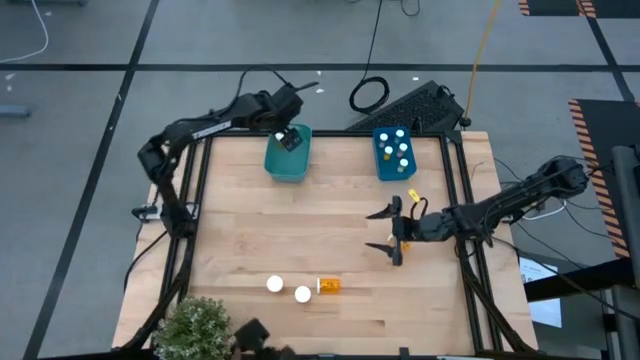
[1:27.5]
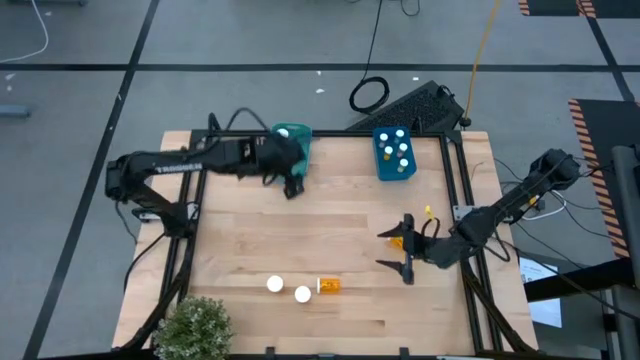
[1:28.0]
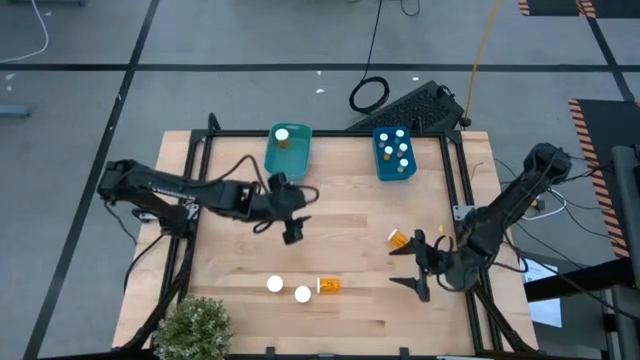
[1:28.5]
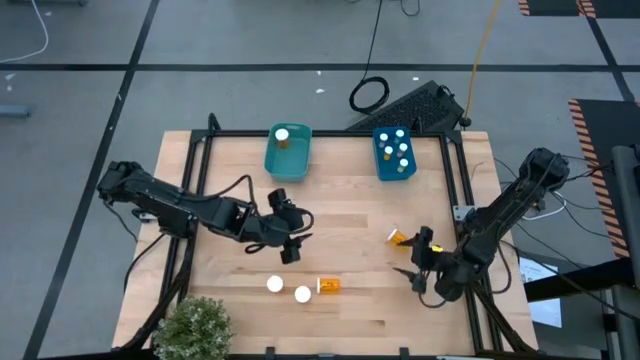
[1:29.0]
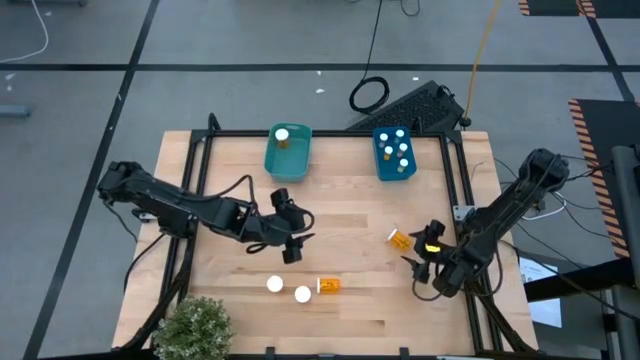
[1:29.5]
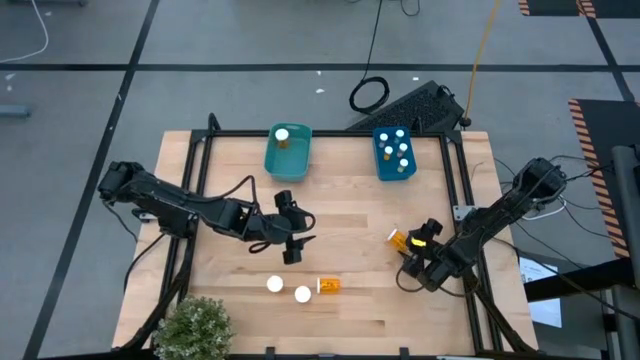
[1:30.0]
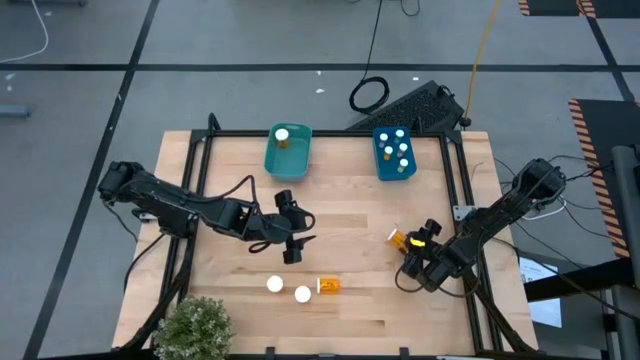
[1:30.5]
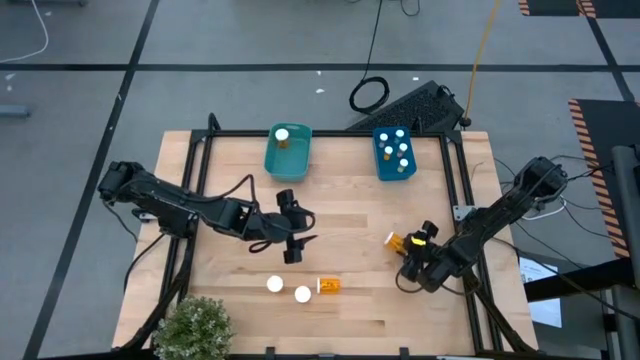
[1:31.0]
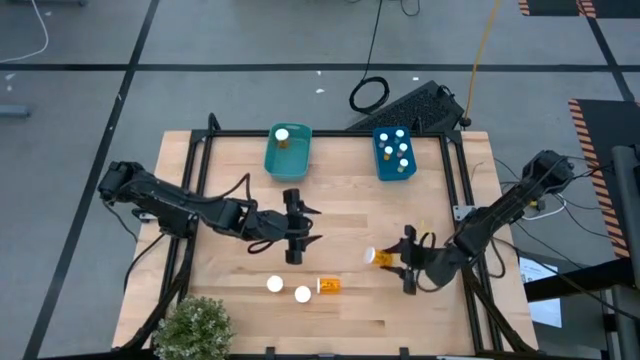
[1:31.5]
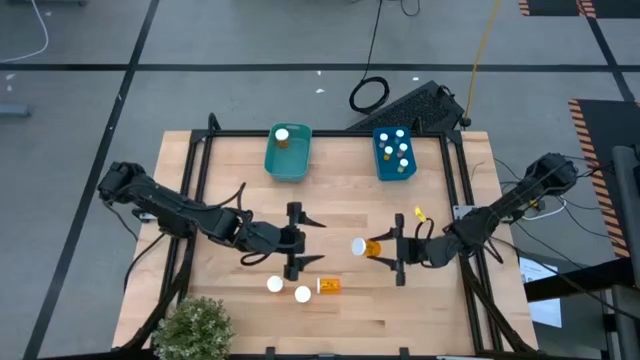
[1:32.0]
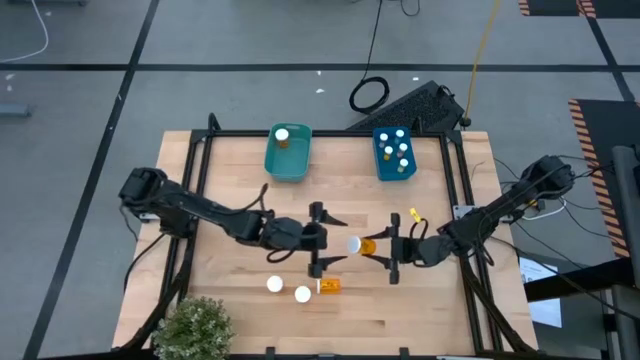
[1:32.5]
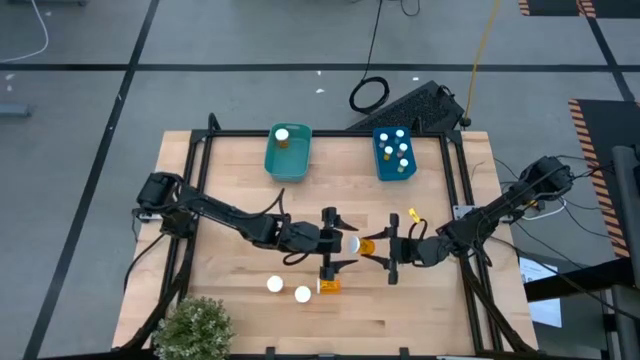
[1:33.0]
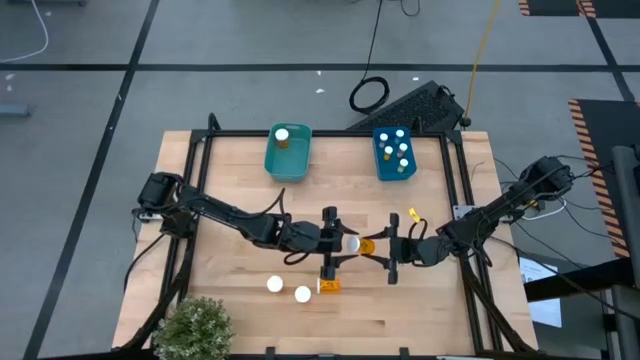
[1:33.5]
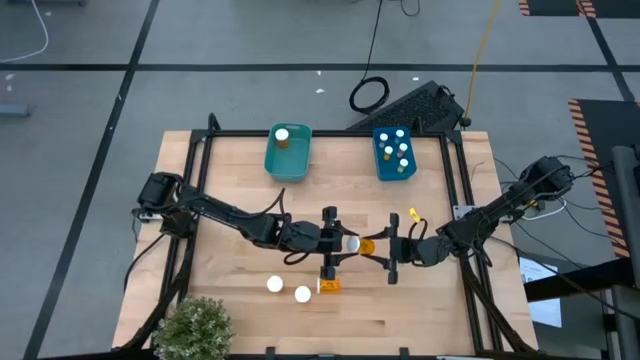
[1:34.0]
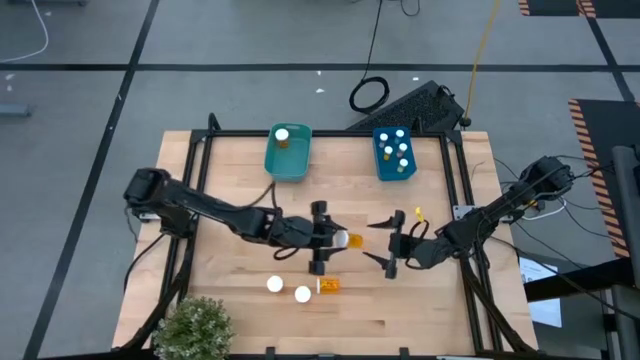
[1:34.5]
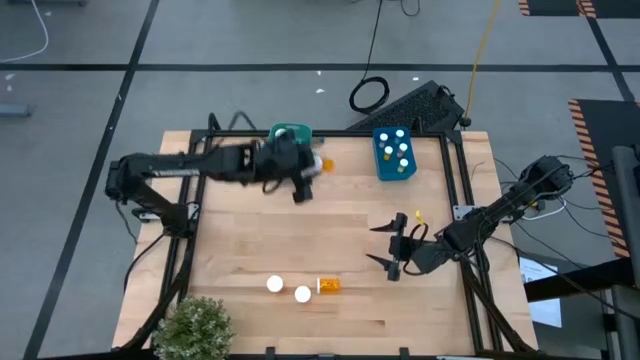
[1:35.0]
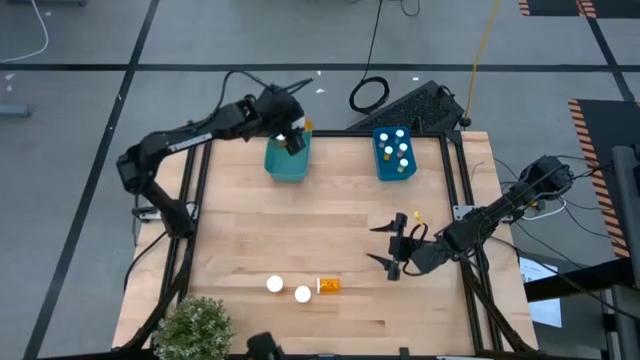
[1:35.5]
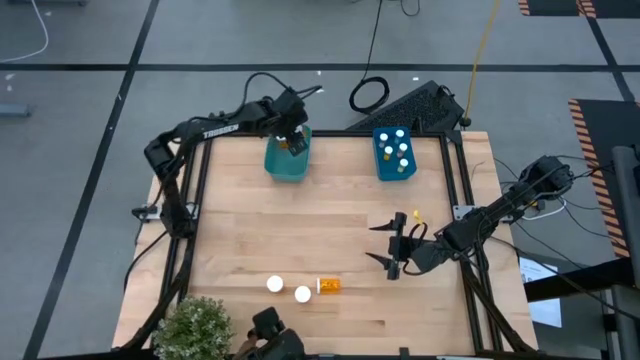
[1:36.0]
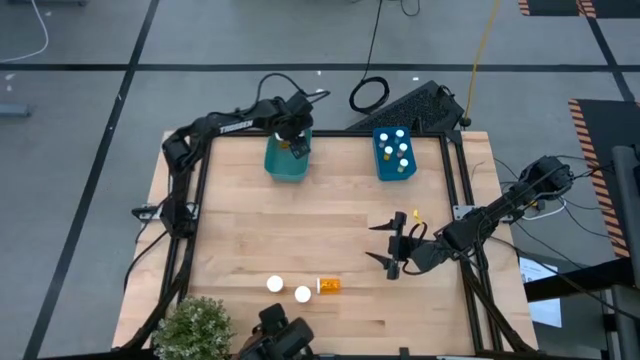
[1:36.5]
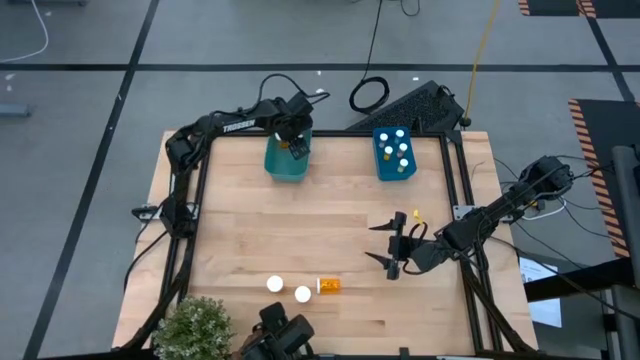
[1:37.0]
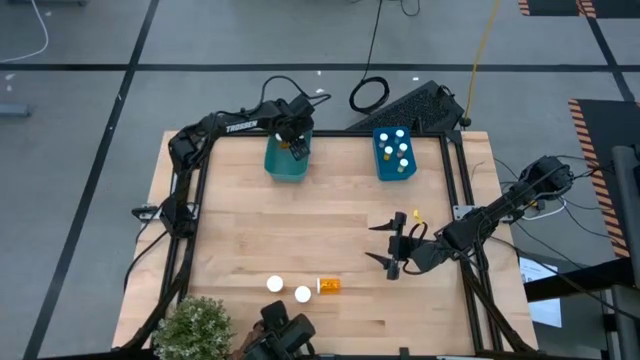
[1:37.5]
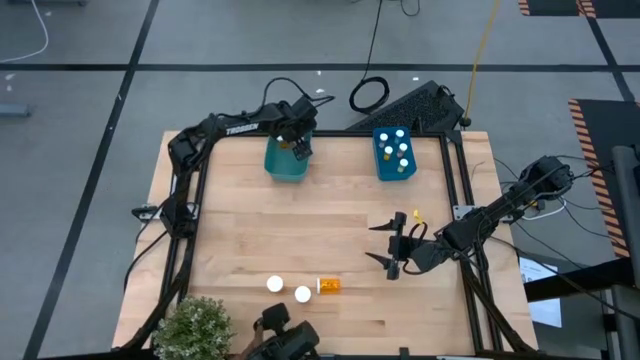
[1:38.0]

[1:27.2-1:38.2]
Task: Pick and place medicine bottles into bin by pill shape (circle, oval)
Put the big orange pill bottle into the green bin

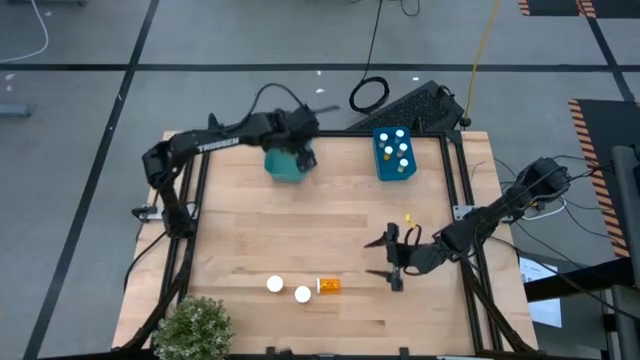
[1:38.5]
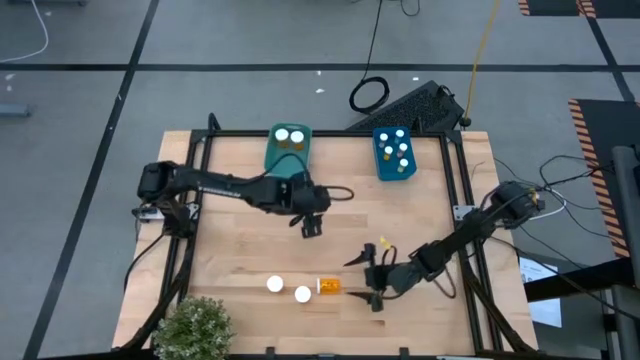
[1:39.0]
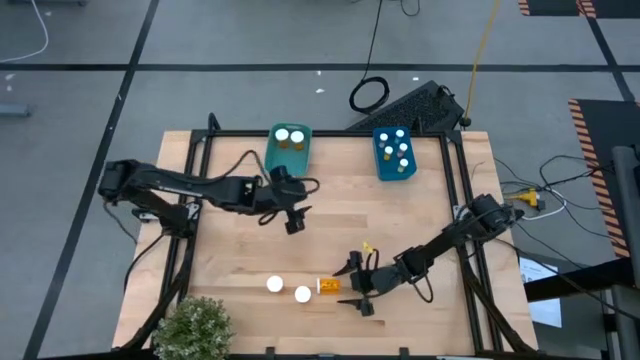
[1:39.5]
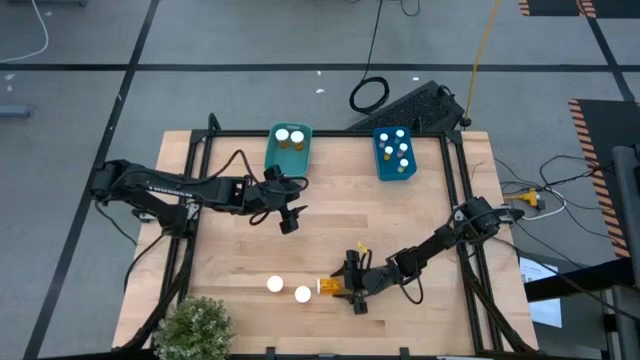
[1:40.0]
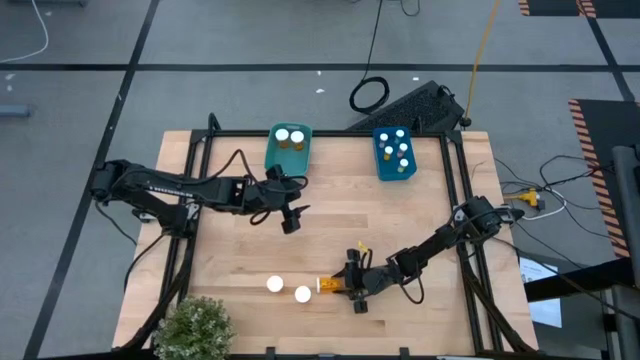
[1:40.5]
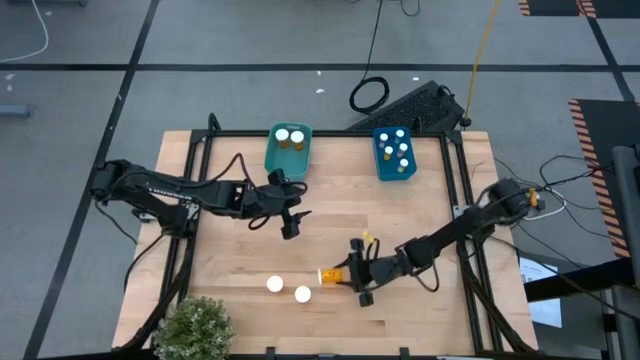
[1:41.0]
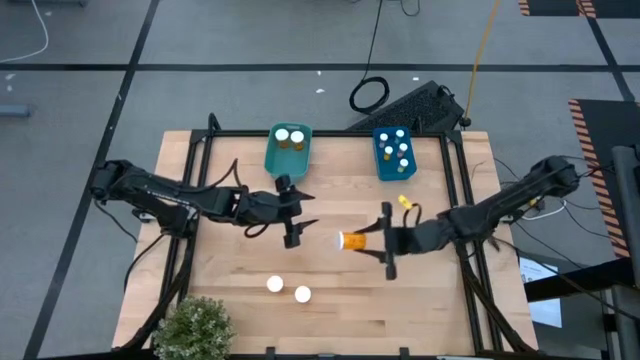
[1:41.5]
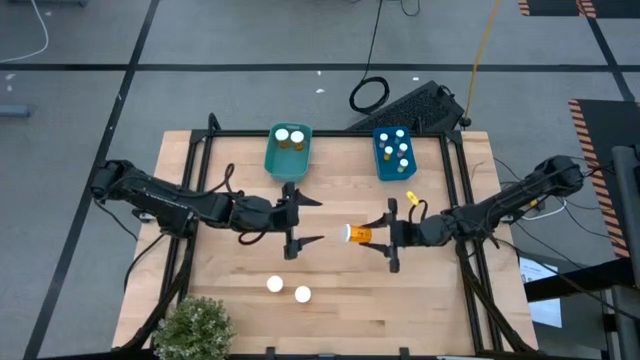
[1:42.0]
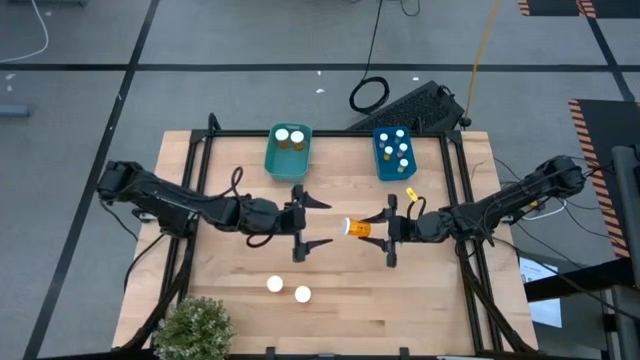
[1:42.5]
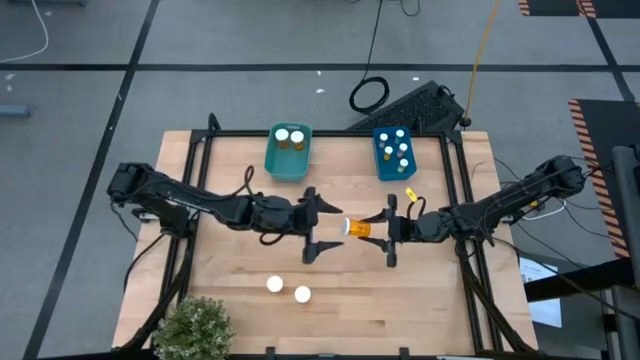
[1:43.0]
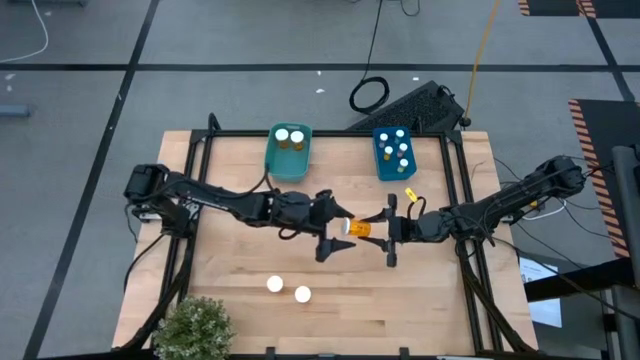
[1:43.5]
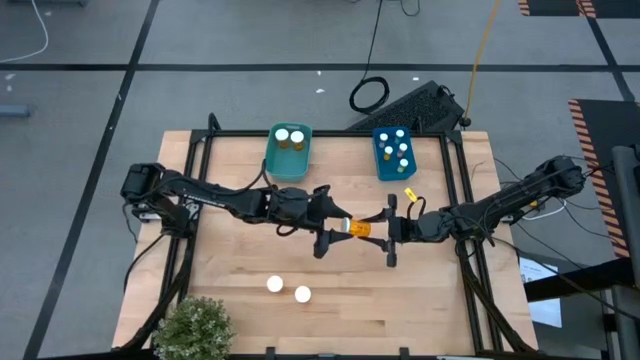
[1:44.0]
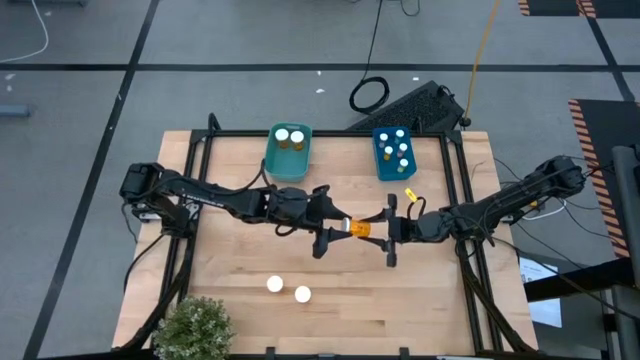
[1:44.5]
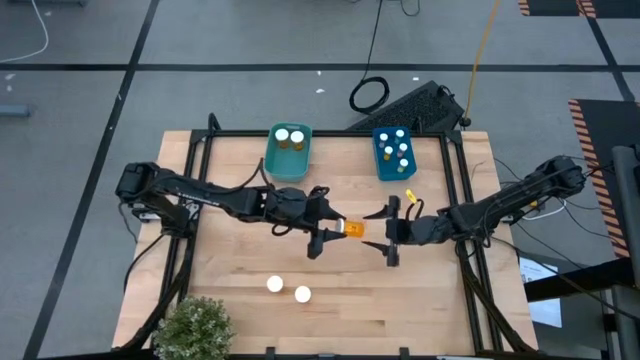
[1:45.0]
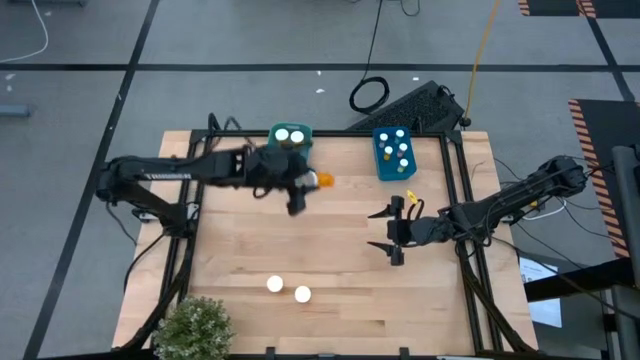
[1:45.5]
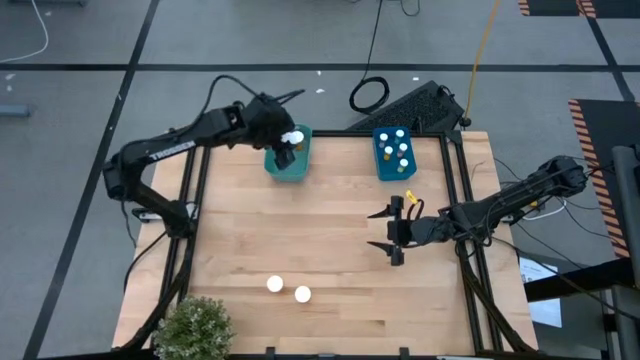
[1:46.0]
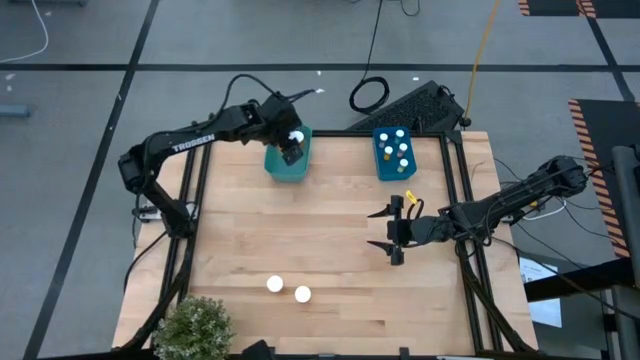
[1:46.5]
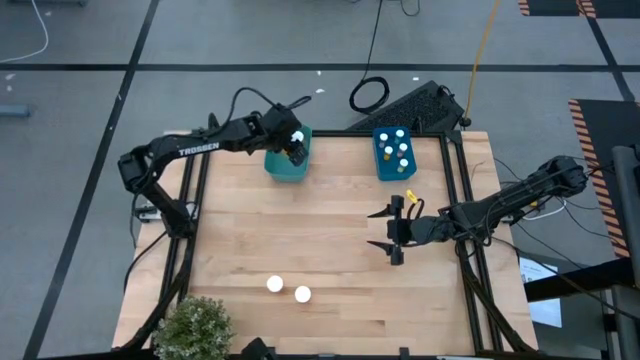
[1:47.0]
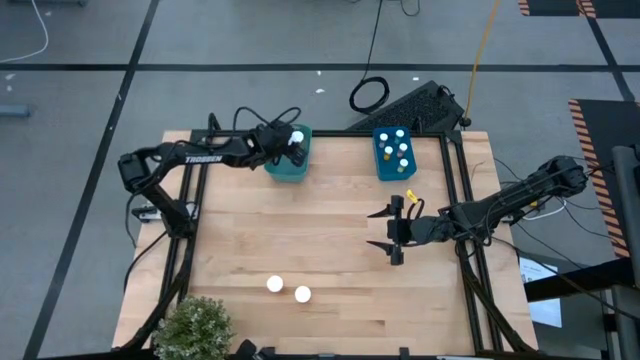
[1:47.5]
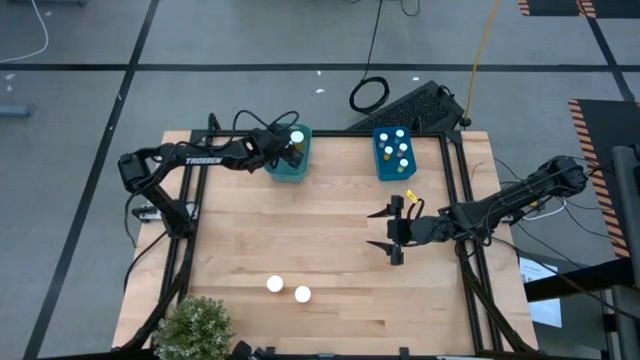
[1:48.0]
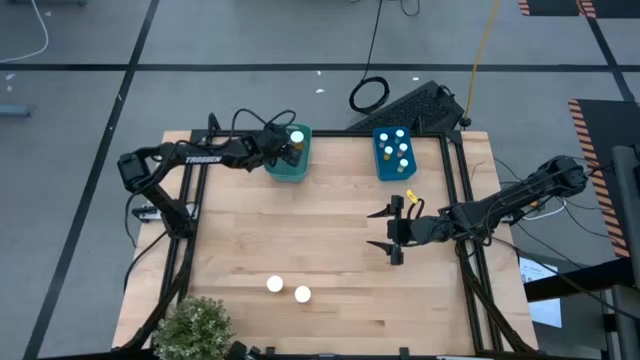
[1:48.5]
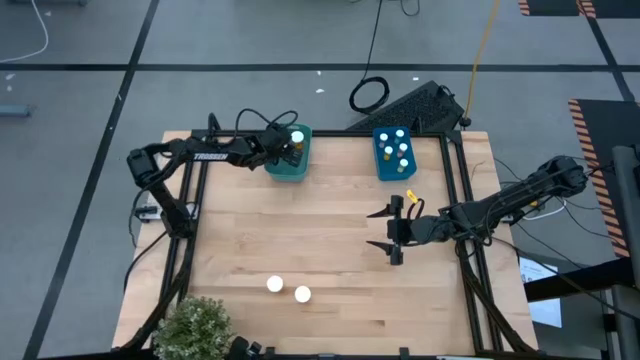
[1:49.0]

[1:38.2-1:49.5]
Put the right big orange pill bottle into the green bin
